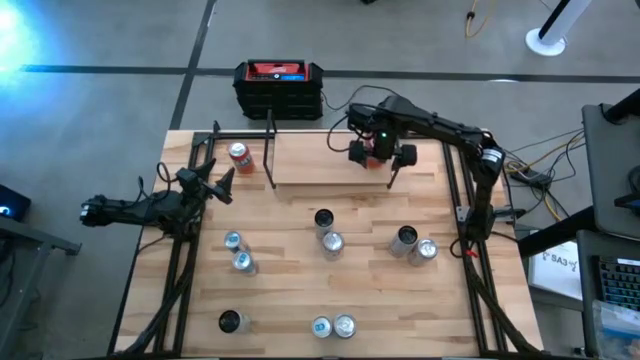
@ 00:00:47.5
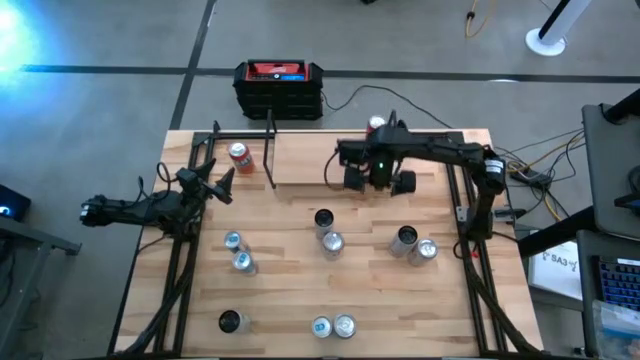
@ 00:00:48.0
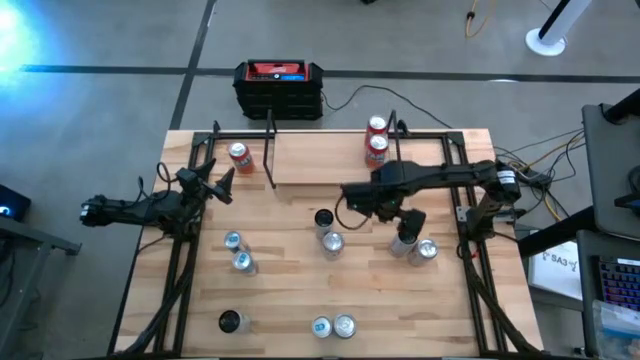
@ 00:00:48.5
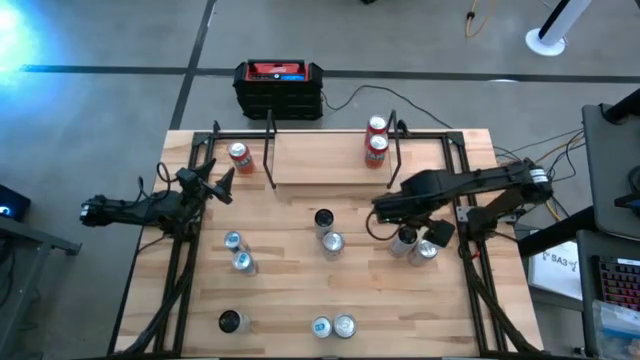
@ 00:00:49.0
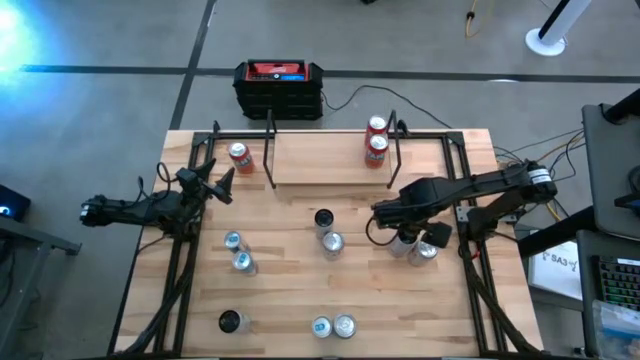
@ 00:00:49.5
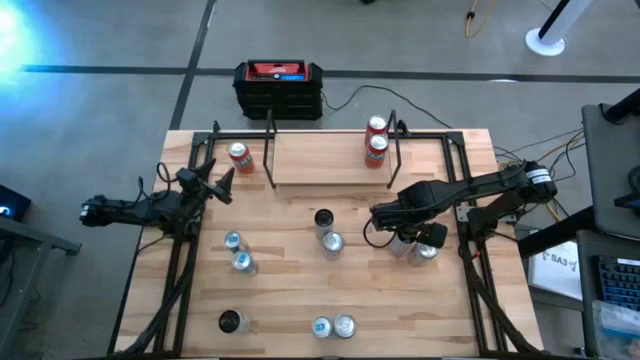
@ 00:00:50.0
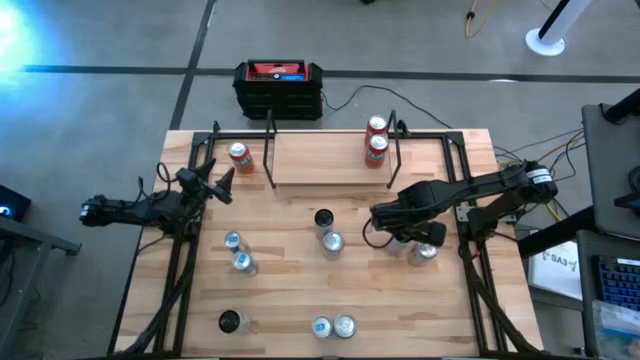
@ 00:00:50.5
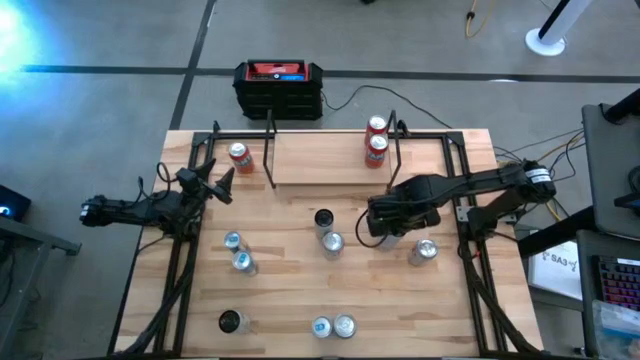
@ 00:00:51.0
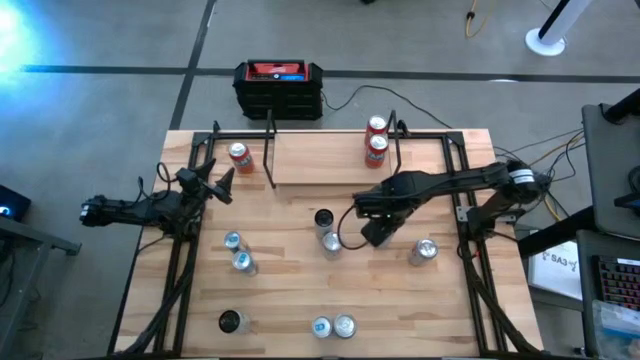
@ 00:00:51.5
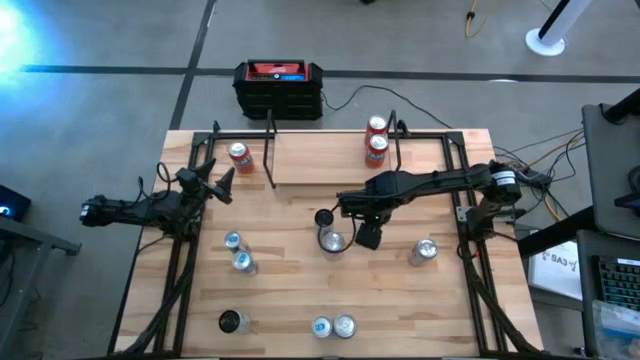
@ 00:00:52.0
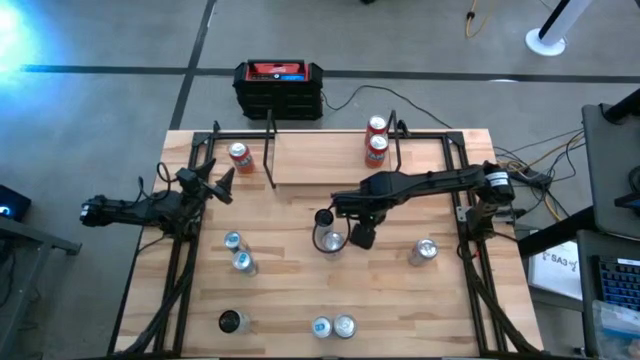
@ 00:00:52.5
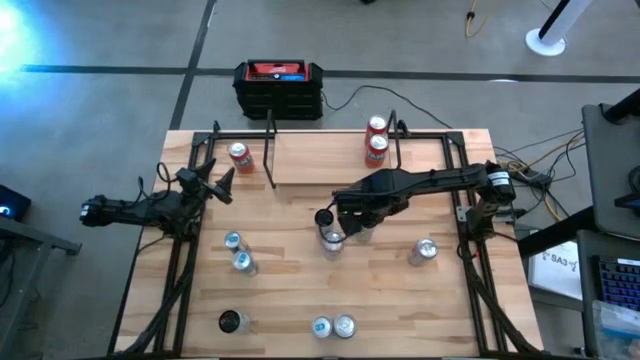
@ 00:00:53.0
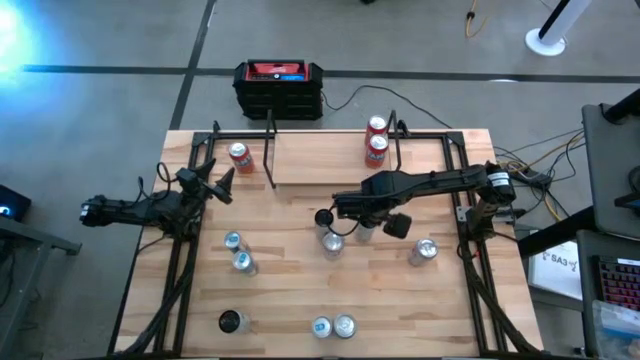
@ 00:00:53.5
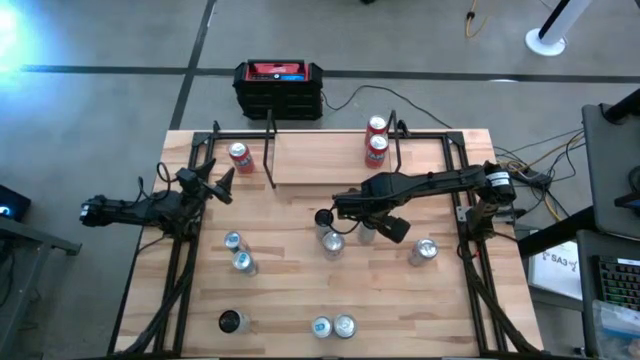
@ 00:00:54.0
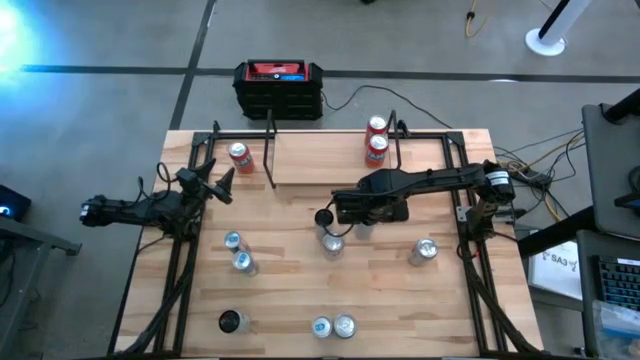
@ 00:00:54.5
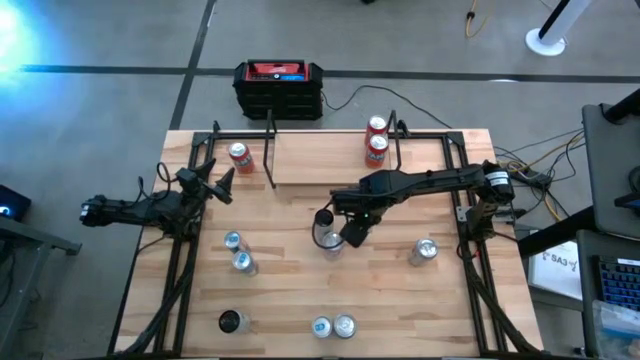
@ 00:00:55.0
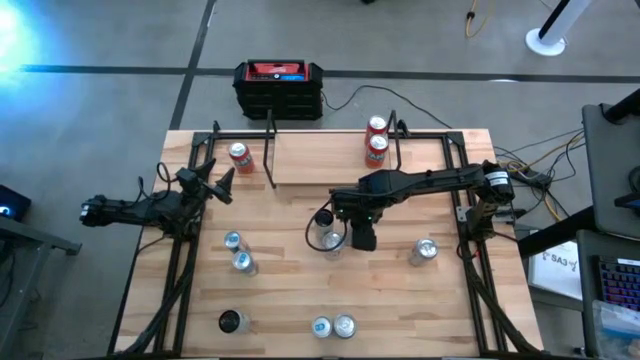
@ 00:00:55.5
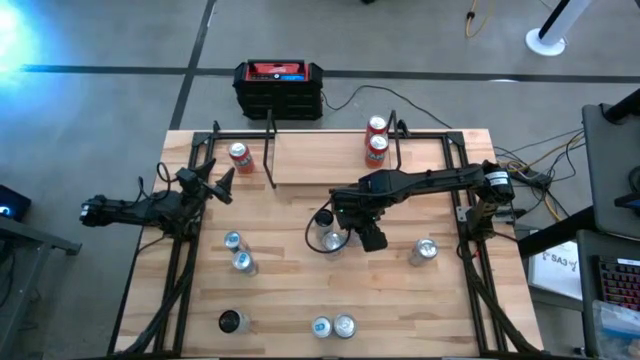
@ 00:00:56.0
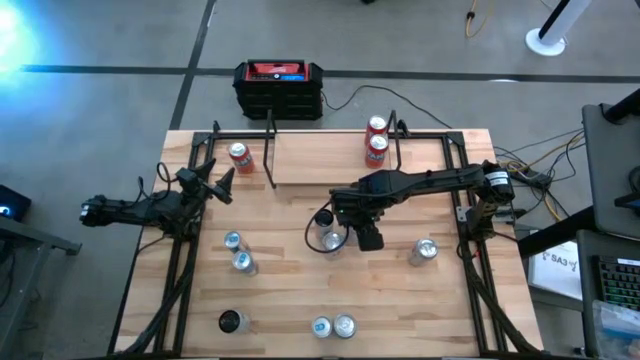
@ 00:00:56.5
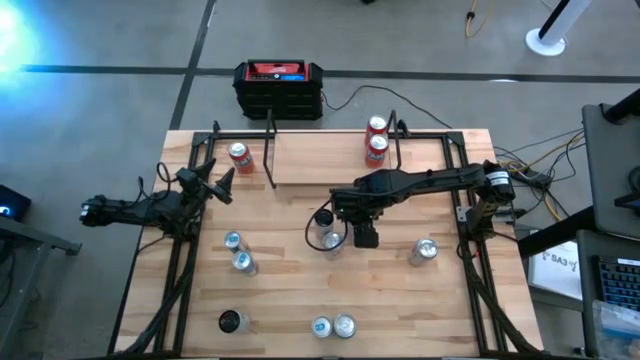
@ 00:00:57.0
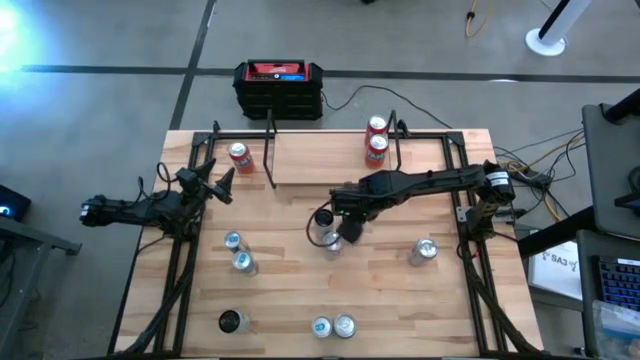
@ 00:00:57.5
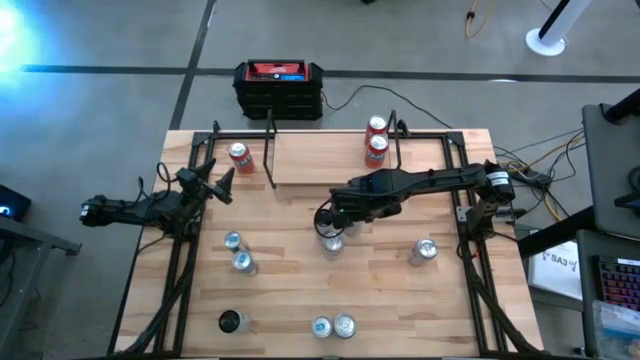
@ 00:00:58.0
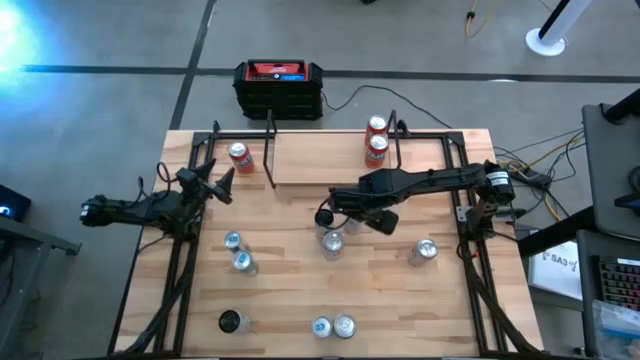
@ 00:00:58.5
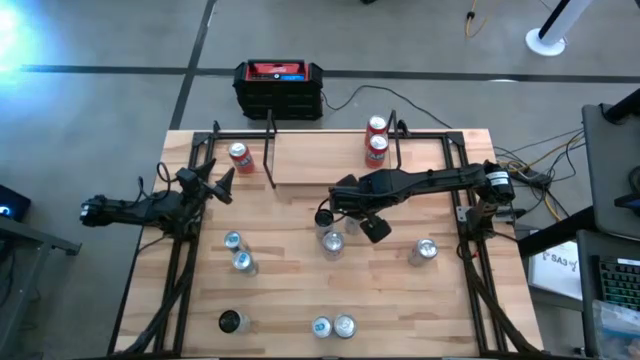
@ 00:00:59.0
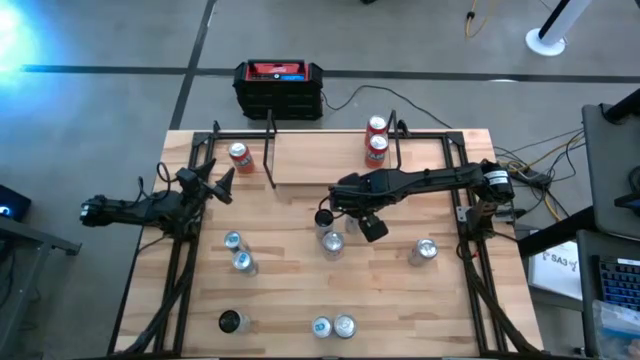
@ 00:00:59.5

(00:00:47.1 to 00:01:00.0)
Task: Place canned beverage on shelf
Put the top white pink soda can on the shelf

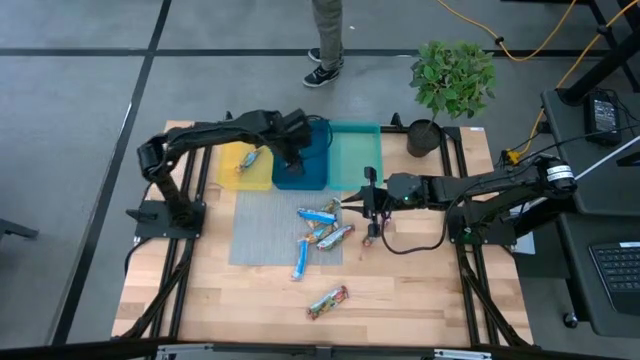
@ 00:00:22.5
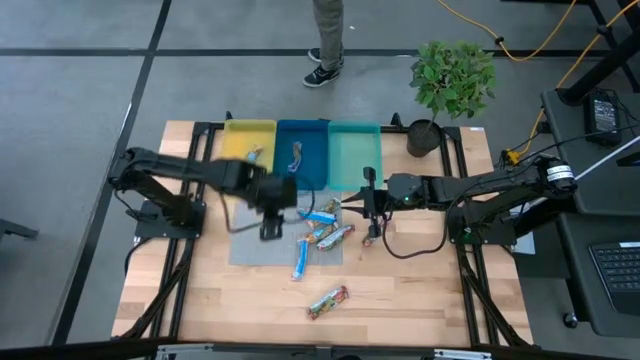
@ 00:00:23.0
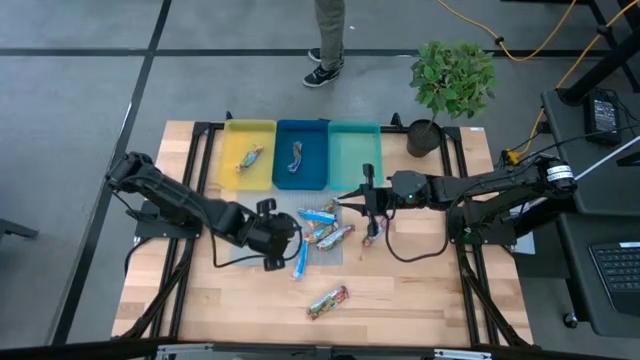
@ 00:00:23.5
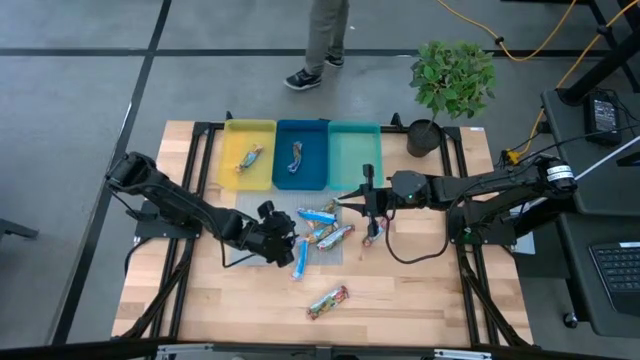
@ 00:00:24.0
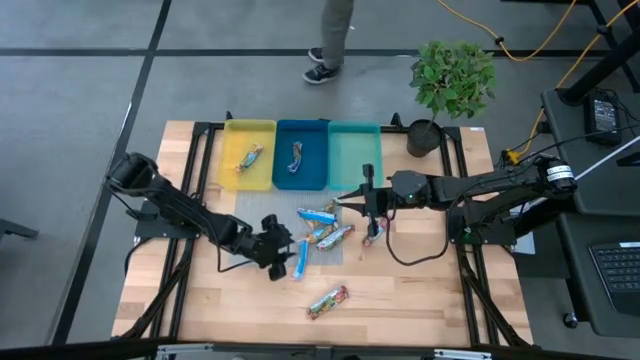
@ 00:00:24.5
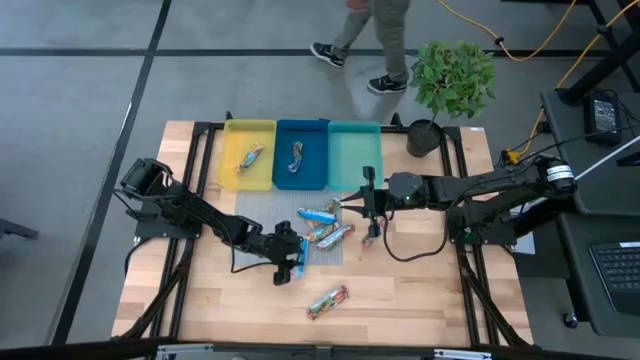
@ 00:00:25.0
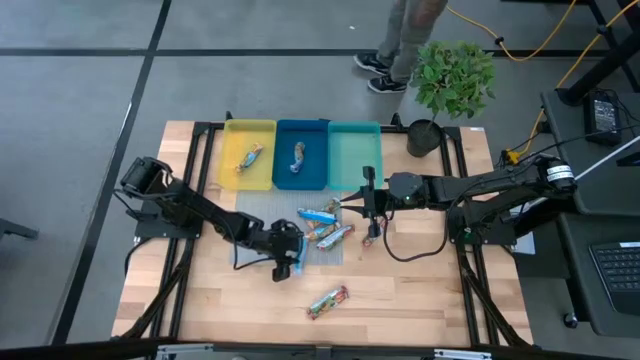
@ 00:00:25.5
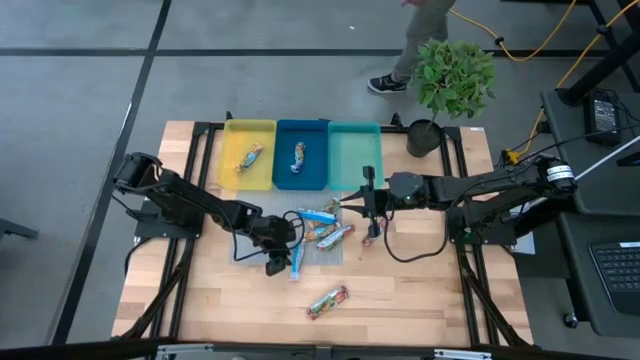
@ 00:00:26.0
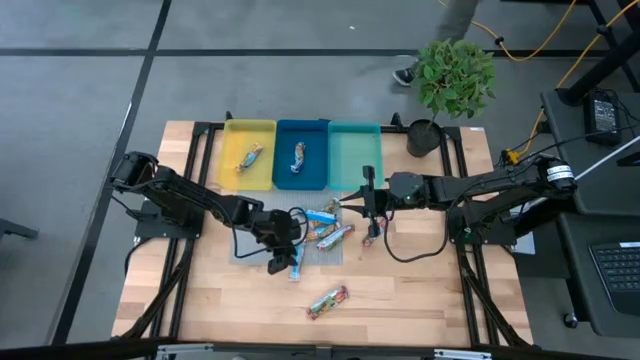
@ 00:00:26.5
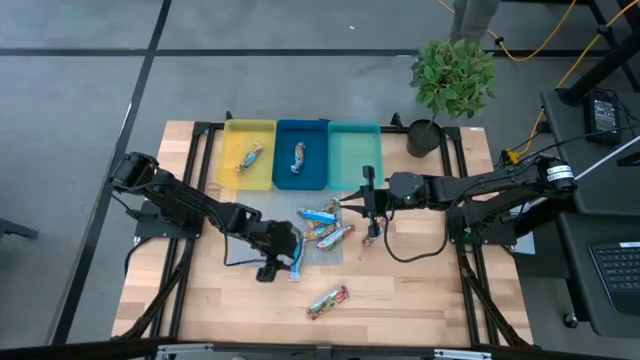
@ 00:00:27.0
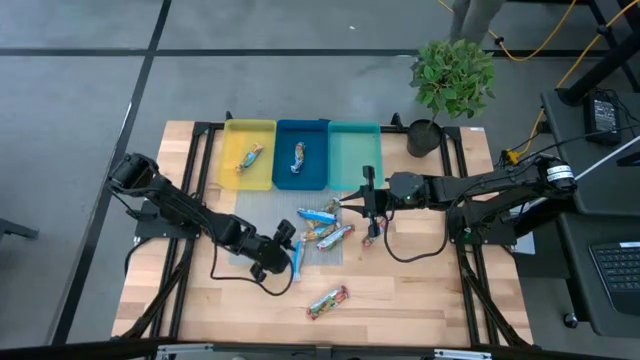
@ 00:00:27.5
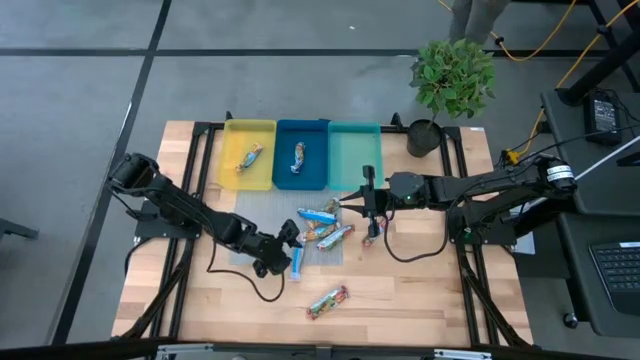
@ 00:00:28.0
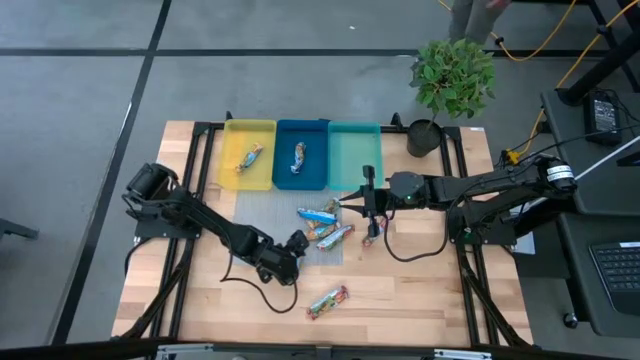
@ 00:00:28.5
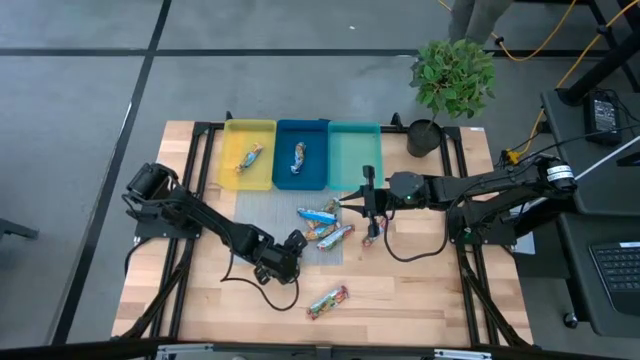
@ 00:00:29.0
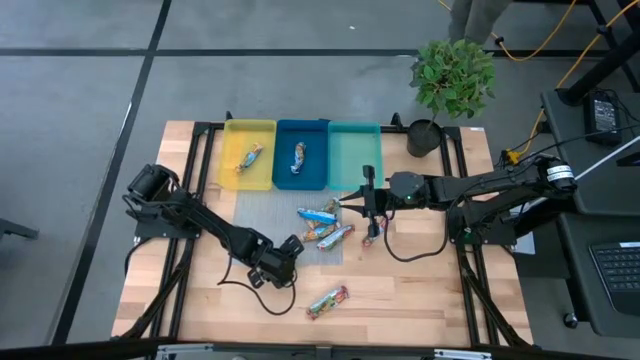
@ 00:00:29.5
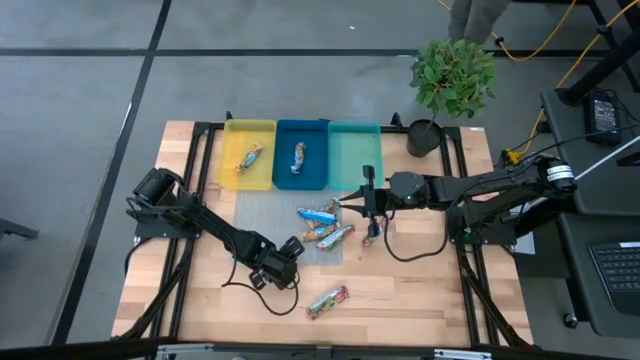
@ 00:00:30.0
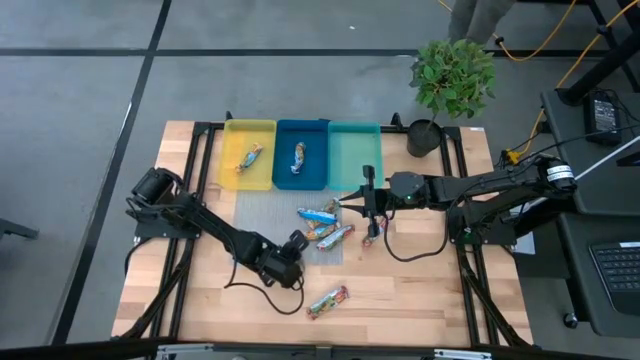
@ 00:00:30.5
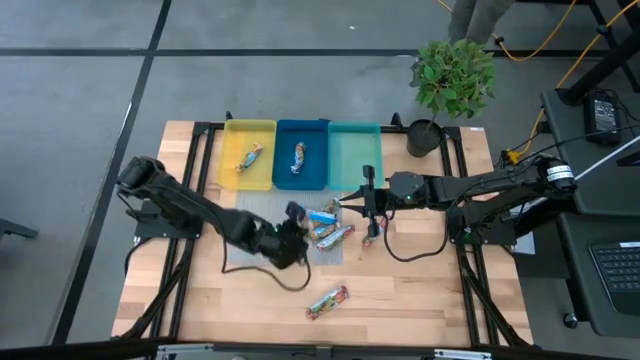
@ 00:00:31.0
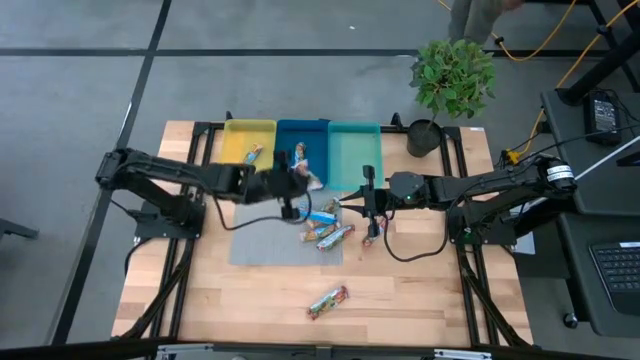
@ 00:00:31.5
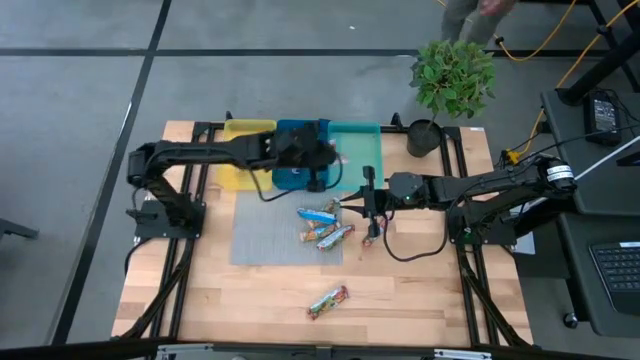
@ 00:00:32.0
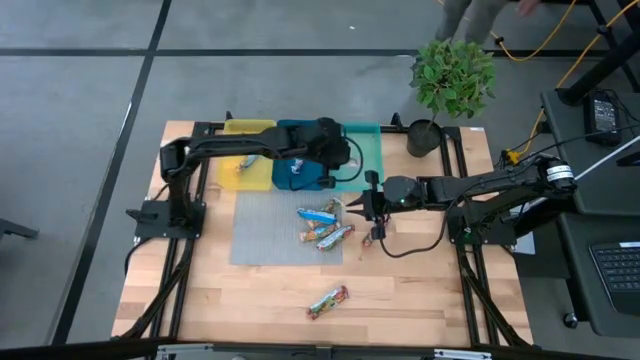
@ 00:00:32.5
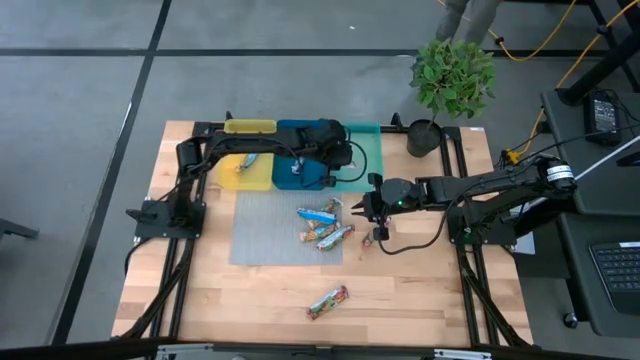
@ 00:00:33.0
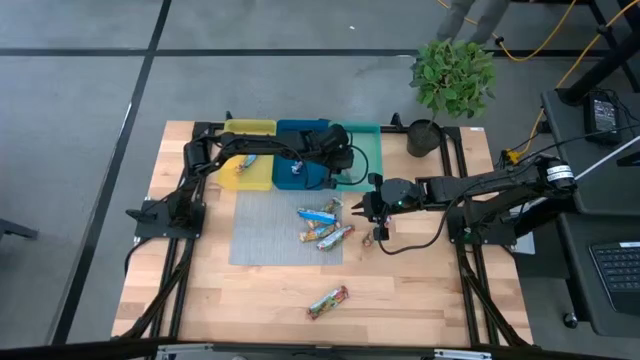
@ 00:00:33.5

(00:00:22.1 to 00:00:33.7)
Task: Pick and place Granola Bars by type
Put the red granola bar into the light blue bin
